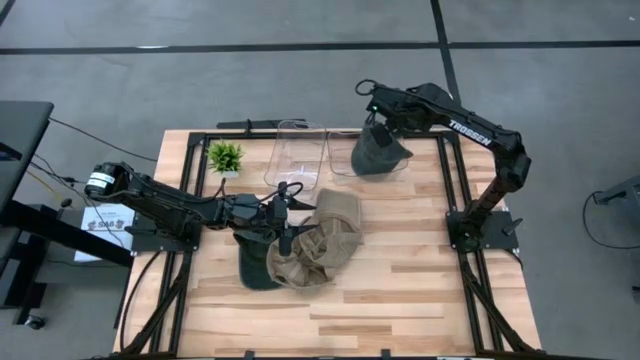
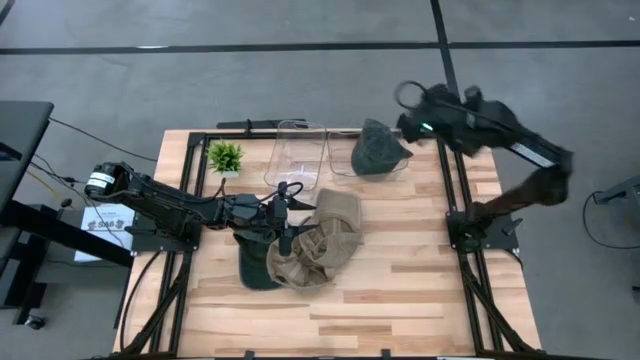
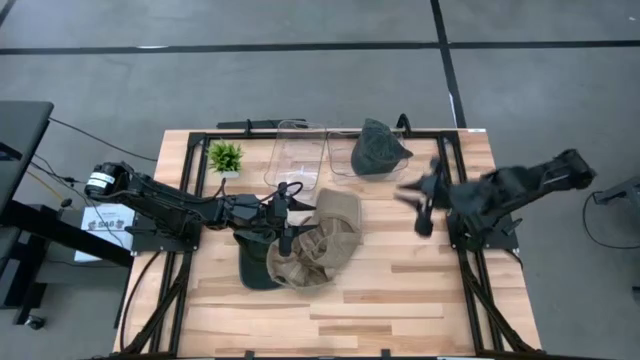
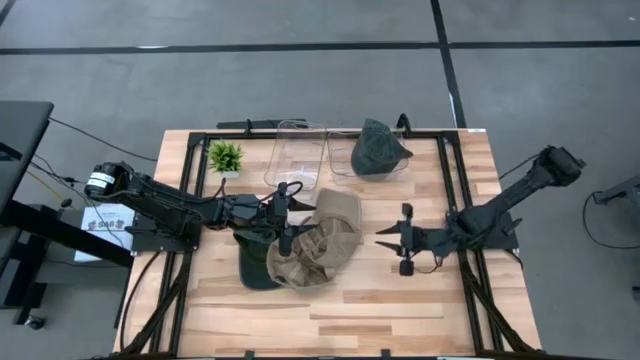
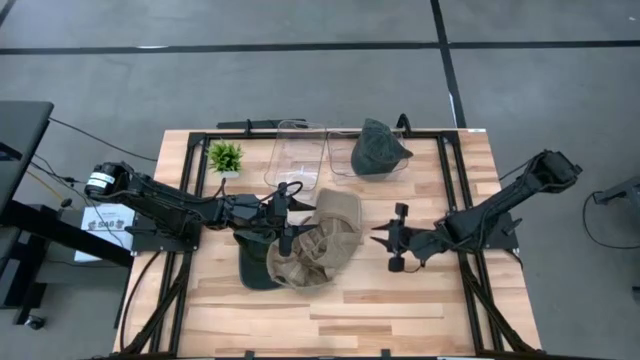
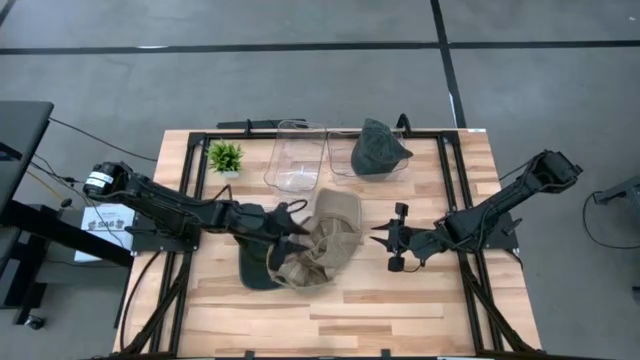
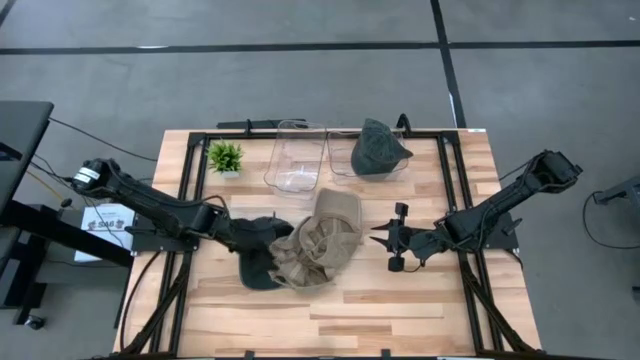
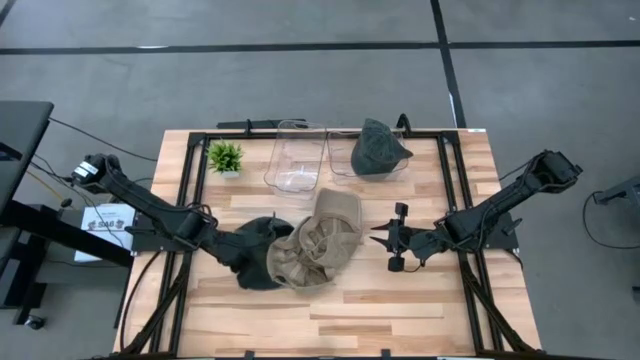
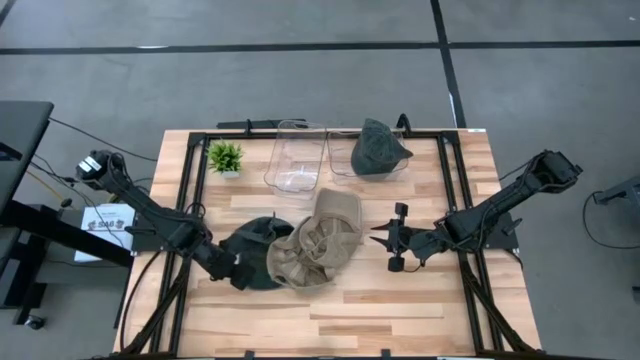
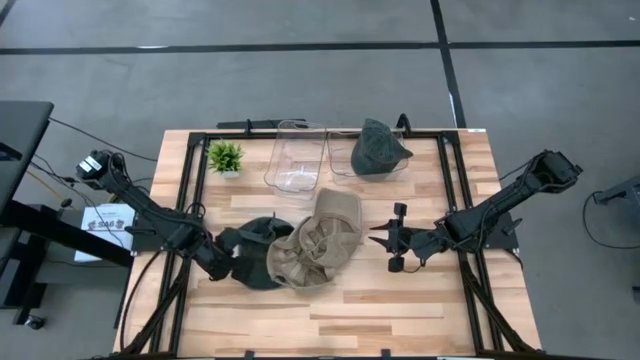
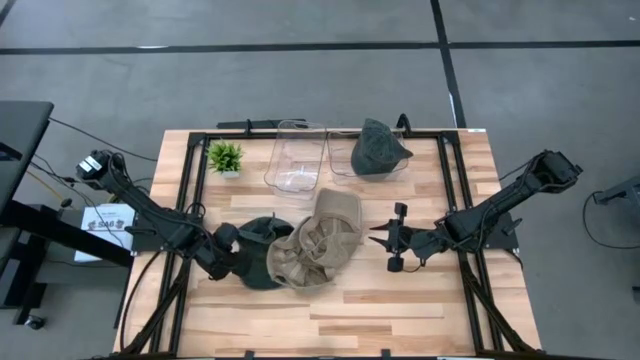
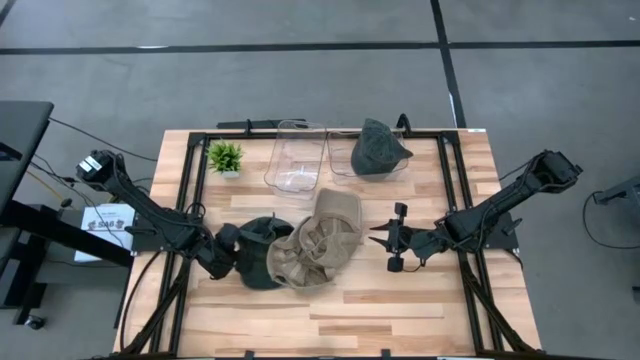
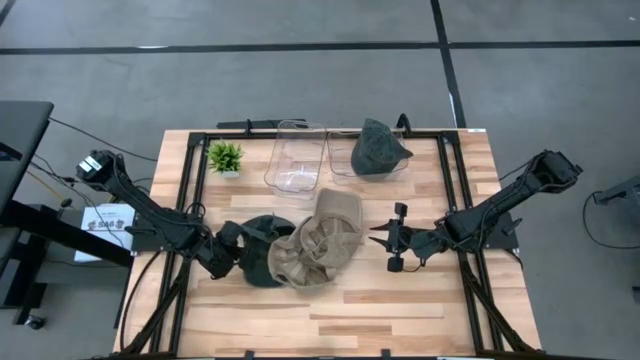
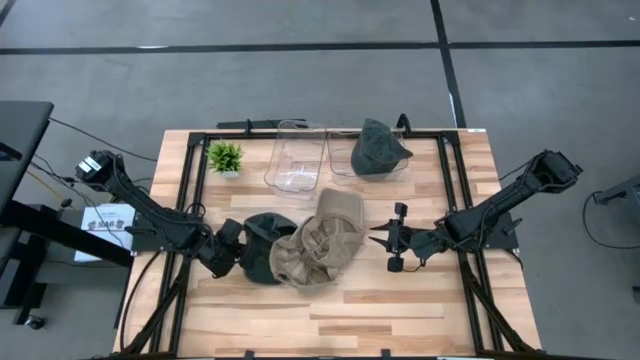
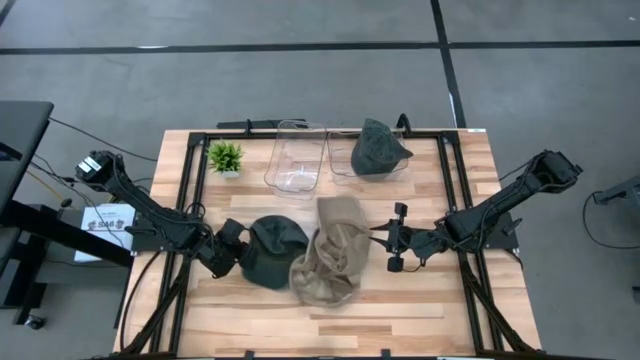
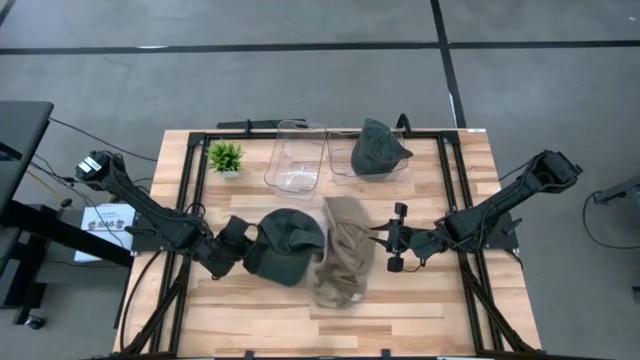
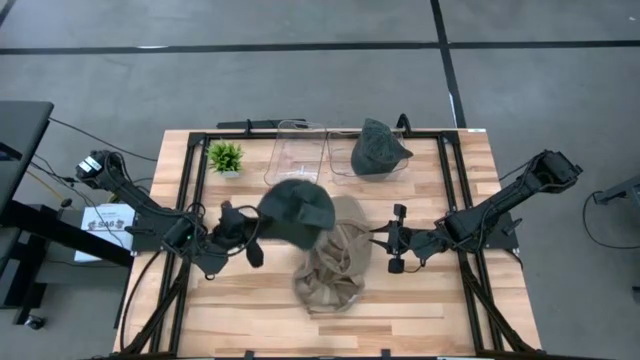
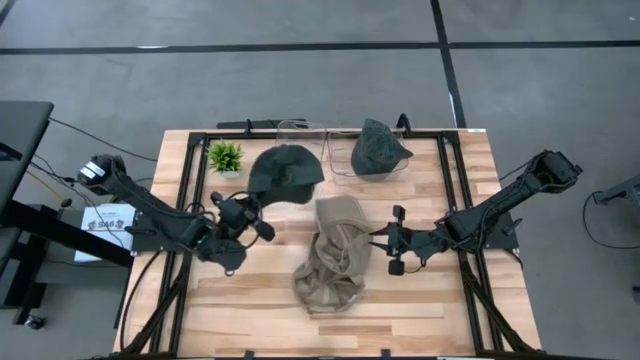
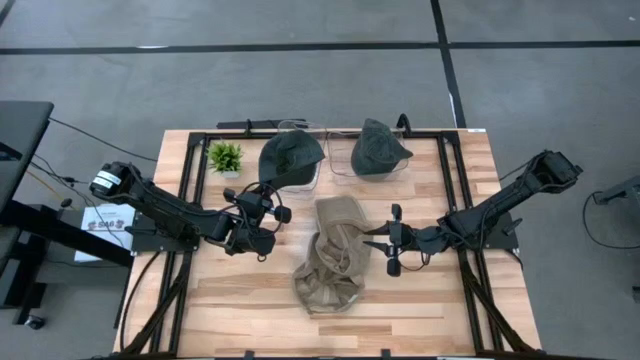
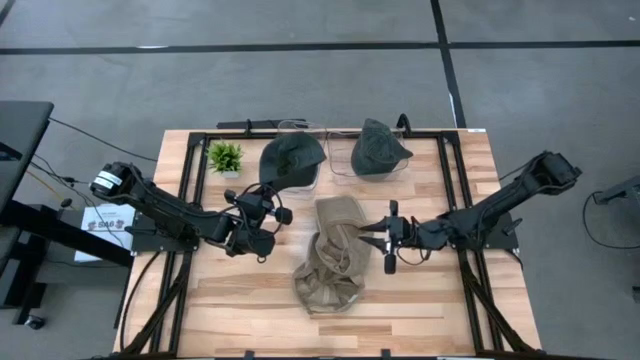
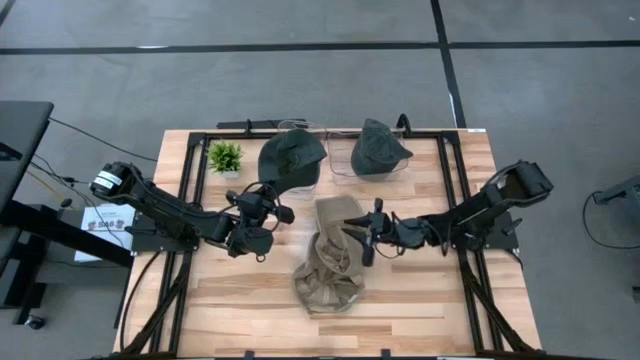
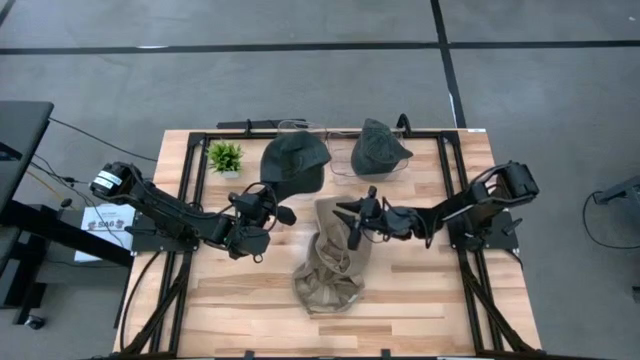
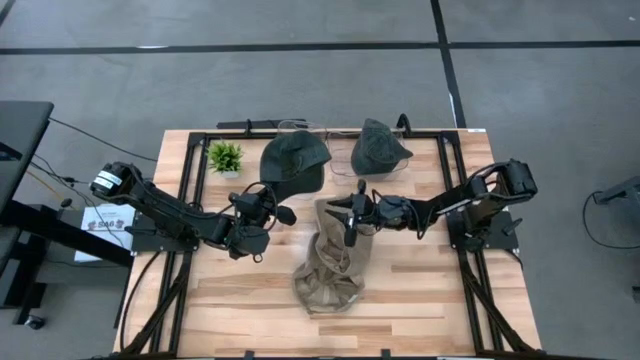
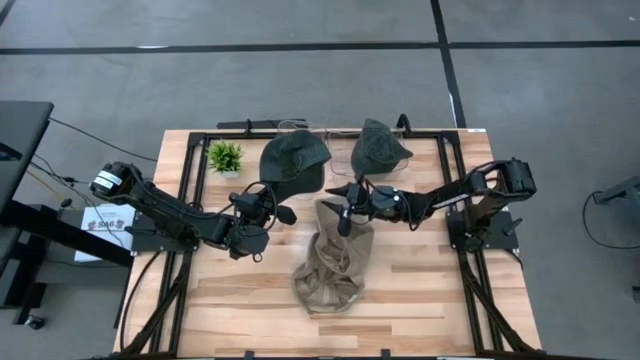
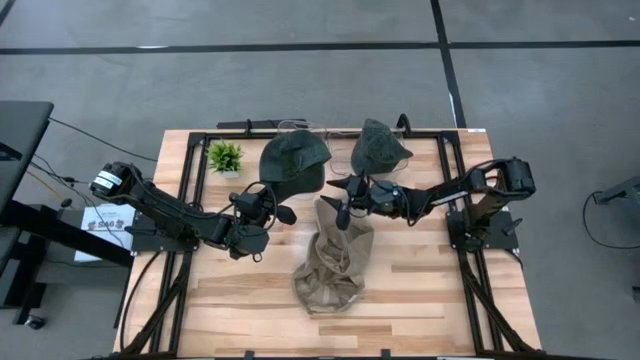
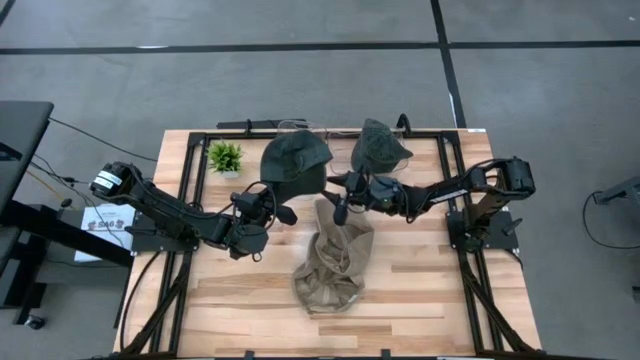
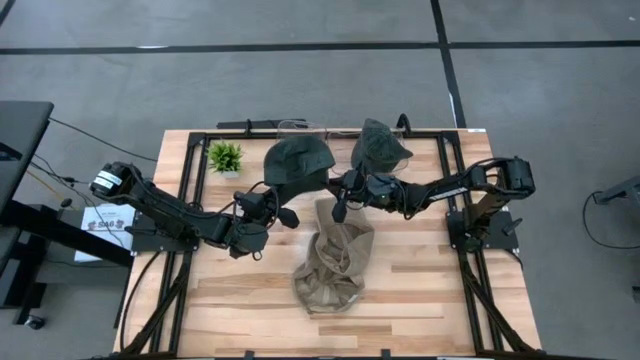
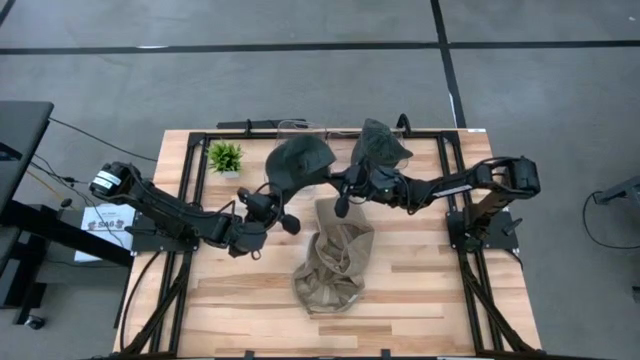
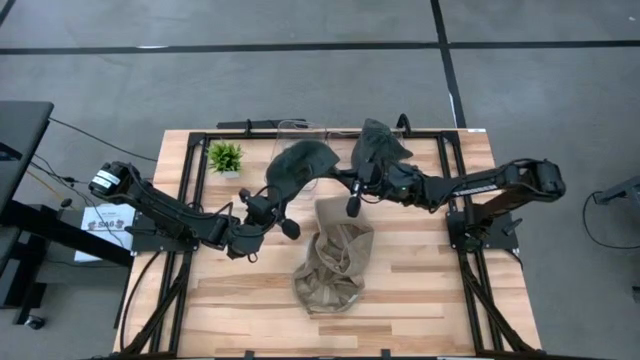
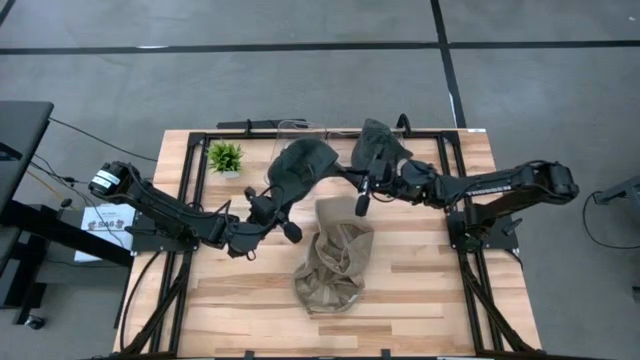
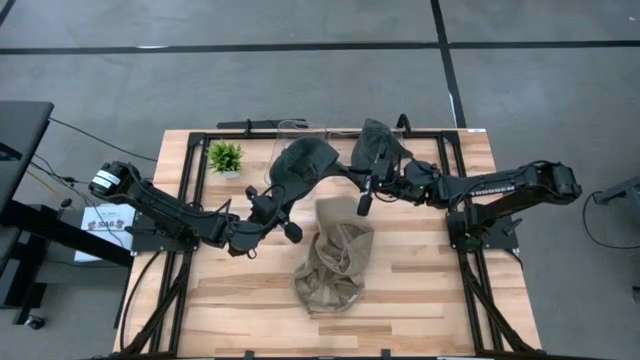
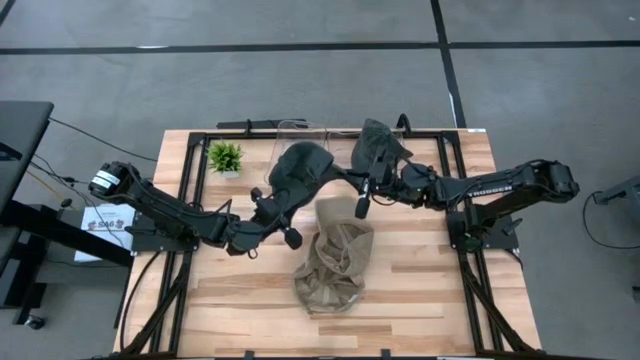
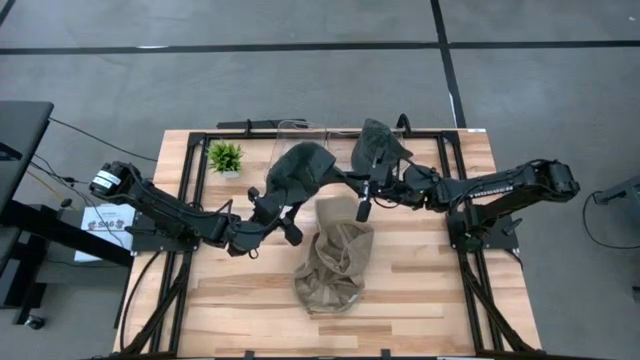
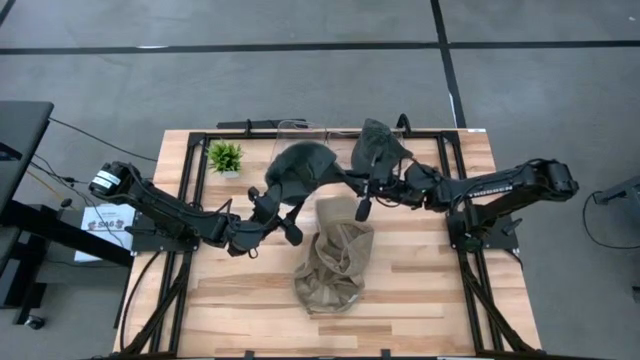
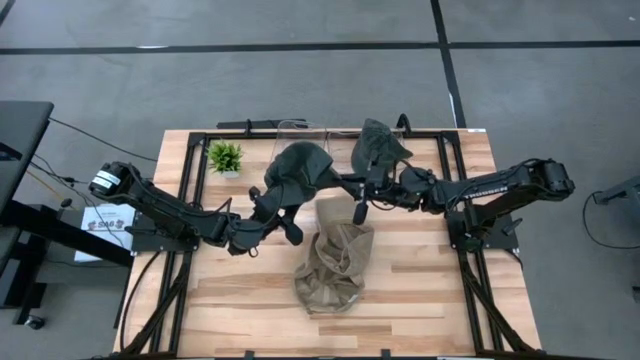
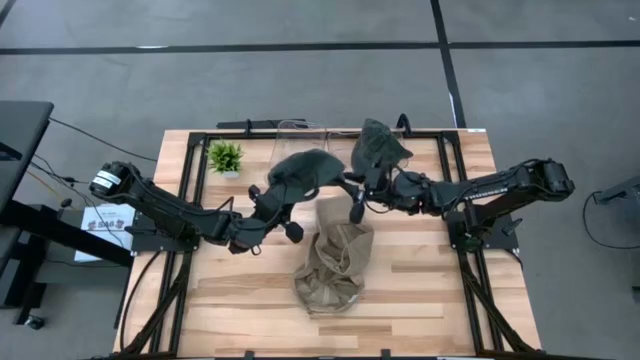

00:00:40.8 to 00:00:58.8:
Task: Pick & Place hat
Put the black cap into the right transparent bin
